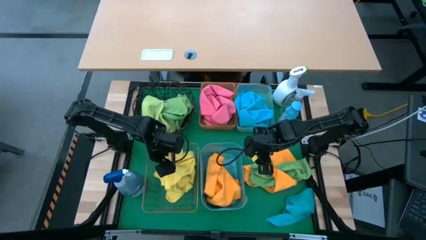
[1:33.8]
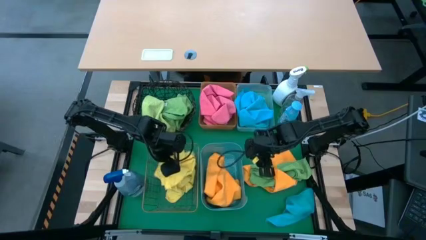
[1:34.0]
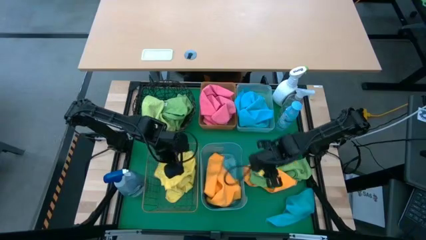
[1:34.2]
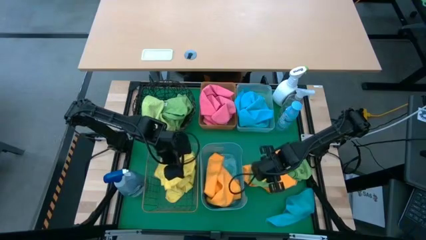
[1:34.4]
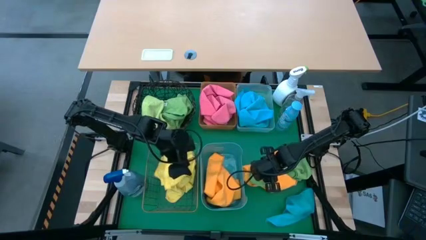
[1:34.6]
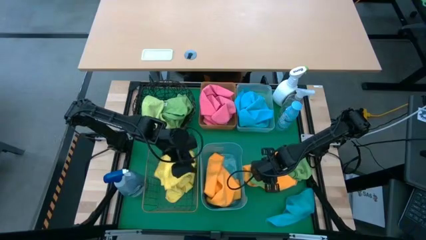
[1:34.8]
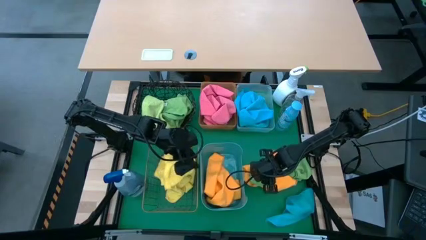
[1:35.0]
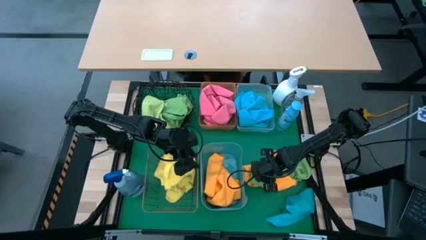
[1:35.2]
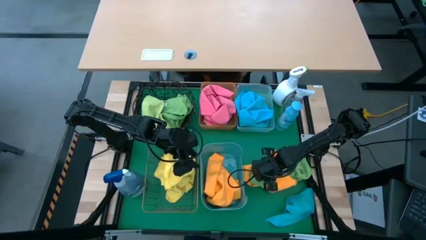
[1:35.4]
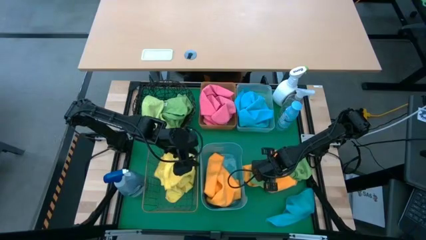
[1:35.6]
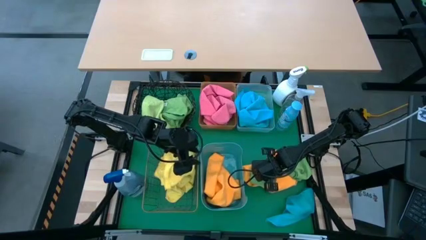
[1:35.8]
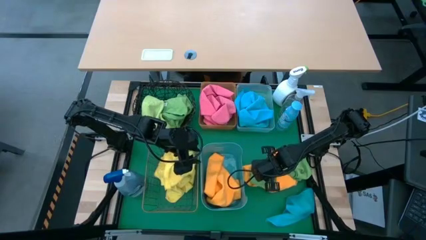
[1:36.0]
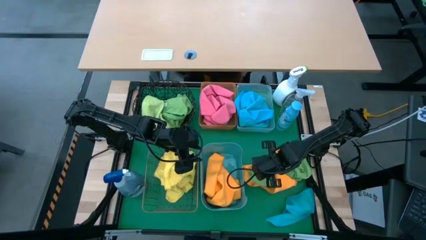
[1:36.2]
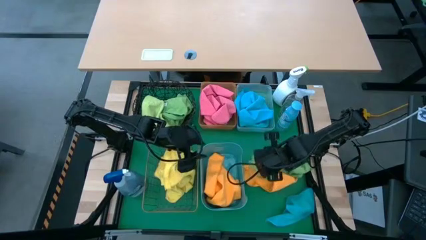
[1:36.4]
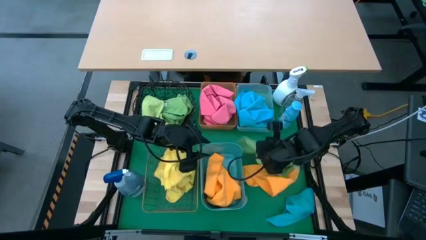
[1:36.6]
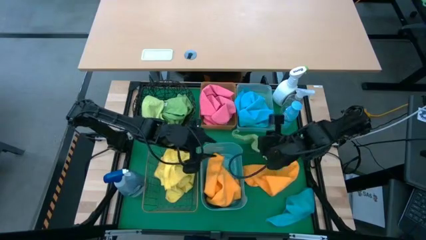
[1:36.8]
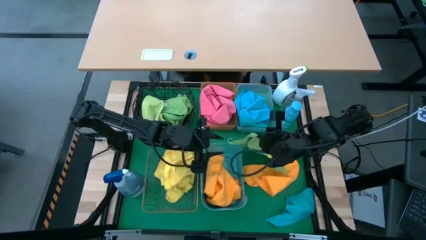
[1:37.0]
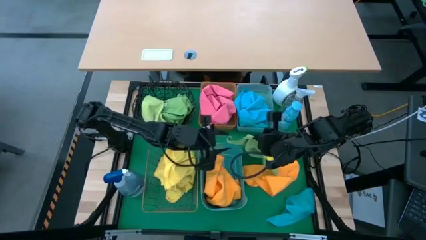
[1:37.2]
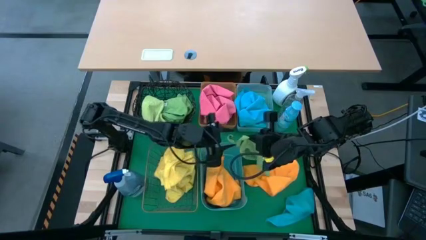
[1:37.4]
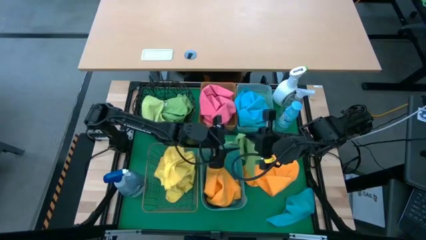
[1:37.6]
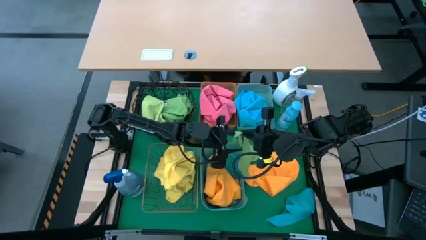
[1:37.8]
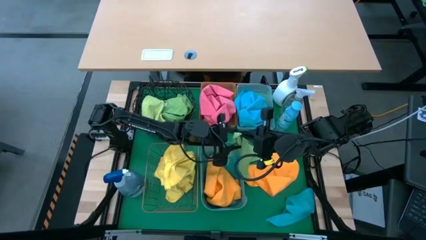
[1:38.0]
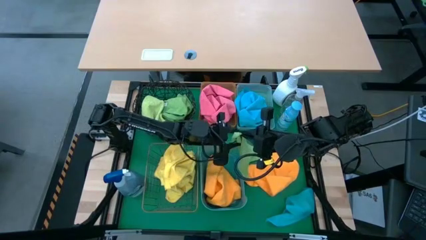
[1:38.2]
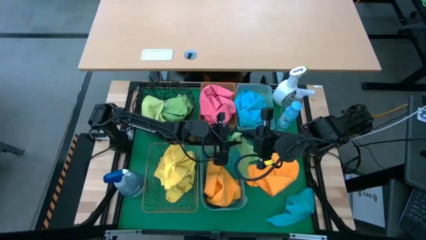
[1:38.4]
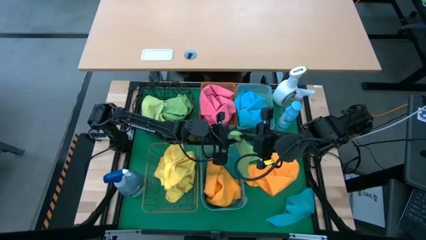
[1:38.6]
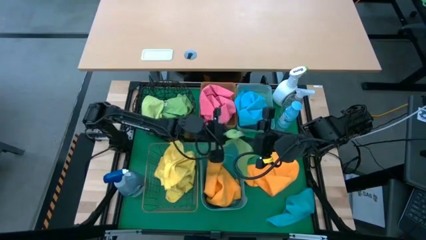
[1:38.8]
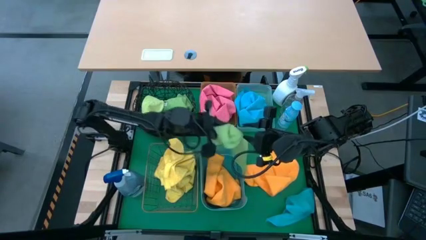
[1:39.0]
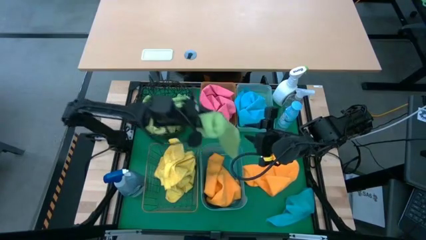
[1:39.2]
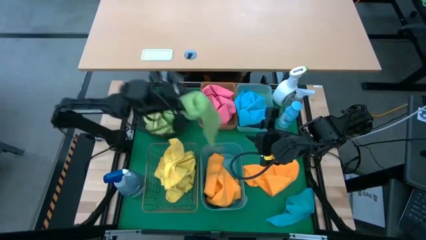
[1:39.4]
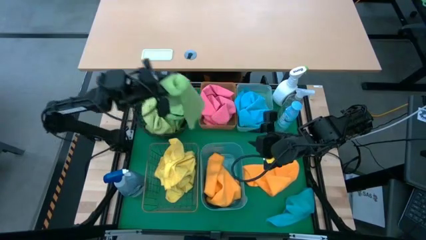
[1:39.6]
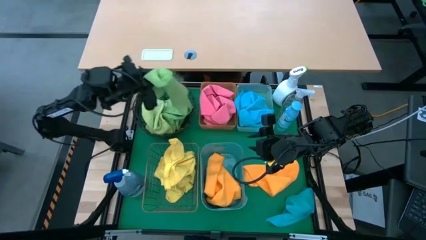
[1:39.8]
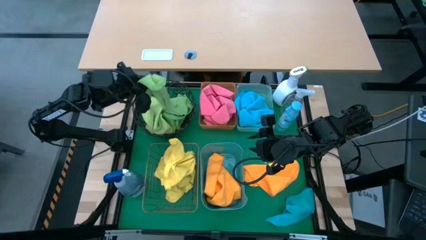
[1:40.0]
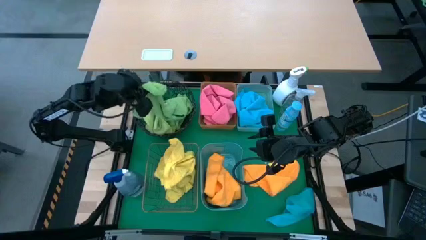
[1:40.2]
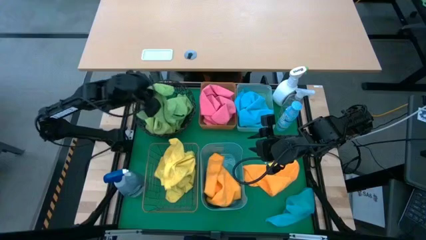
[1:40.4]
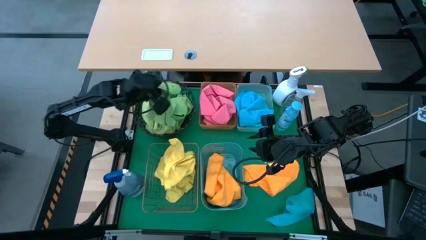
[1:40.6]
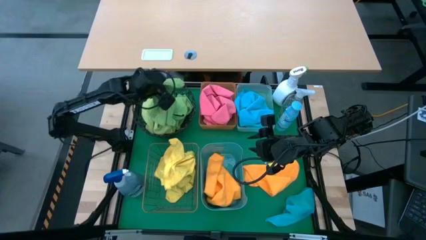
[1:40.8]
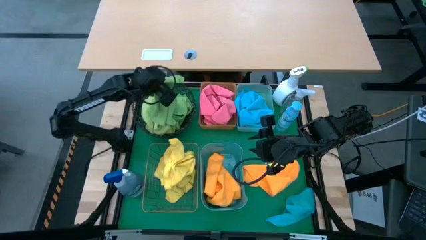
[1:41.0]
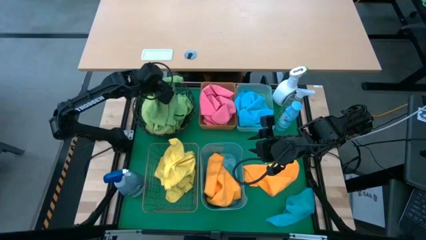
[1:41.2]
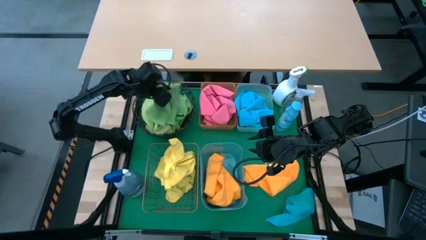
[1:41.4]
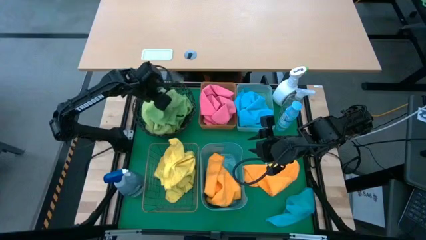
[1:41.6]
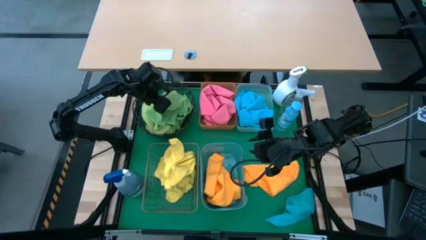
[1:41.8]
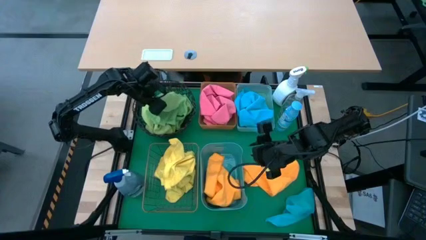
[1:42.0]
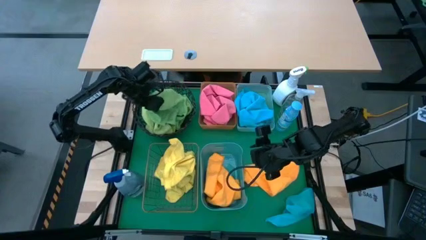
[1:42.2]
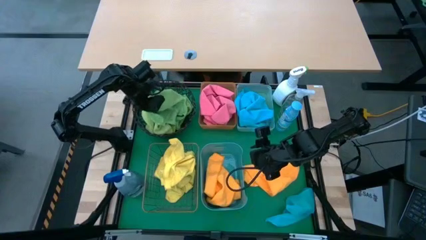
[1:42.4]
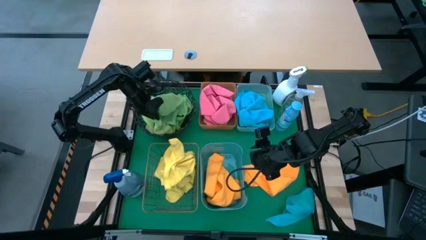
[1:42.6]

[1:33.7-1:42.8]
Task: Sort microfiber towel by color & place in baskets
Put the green towel into the black basket

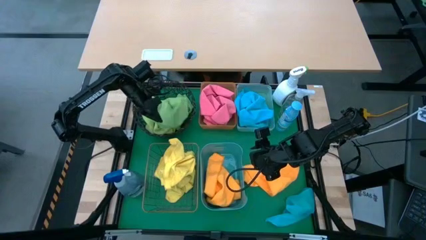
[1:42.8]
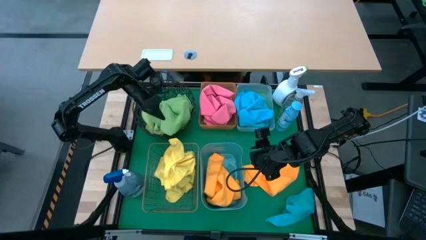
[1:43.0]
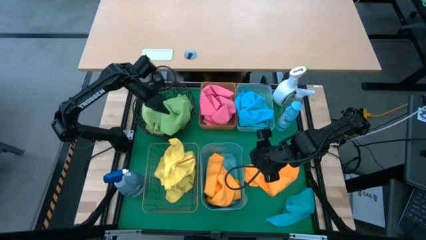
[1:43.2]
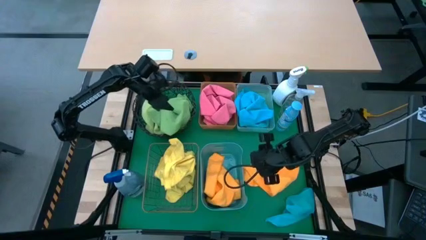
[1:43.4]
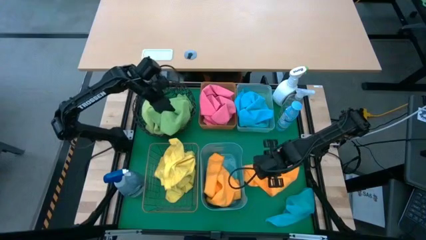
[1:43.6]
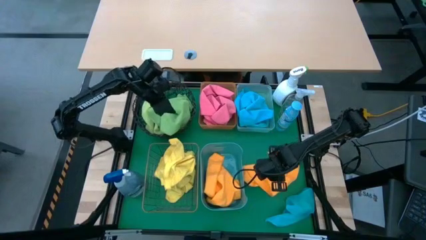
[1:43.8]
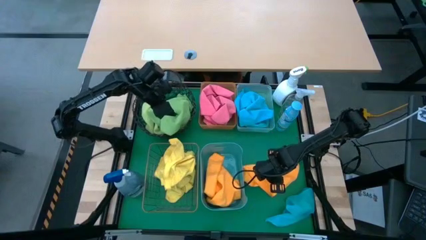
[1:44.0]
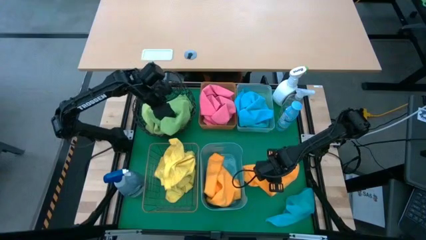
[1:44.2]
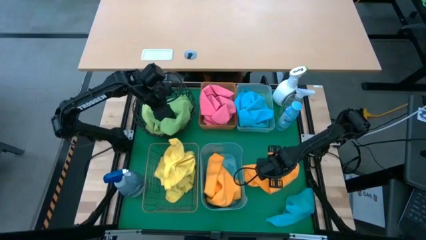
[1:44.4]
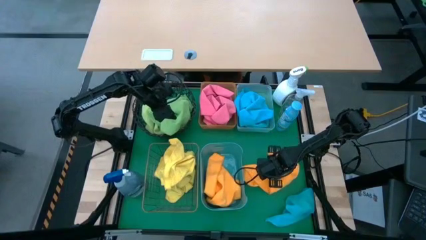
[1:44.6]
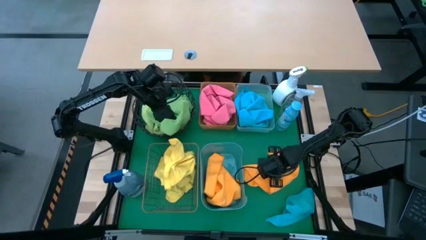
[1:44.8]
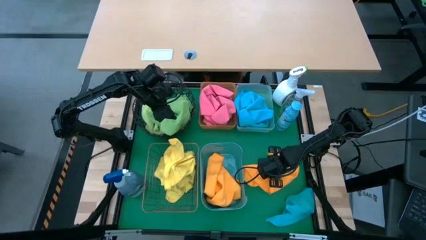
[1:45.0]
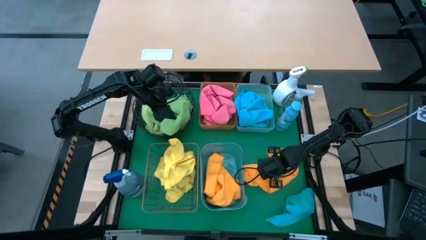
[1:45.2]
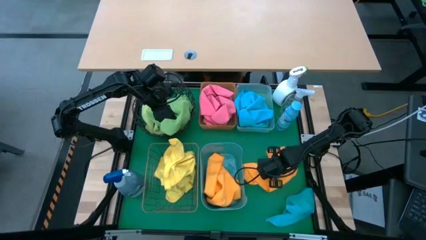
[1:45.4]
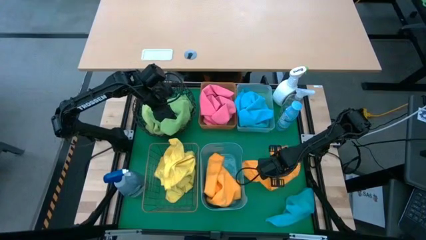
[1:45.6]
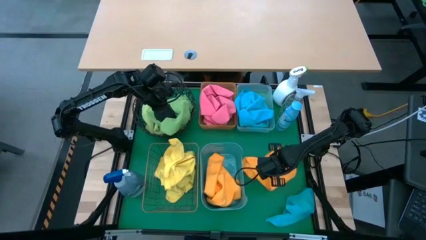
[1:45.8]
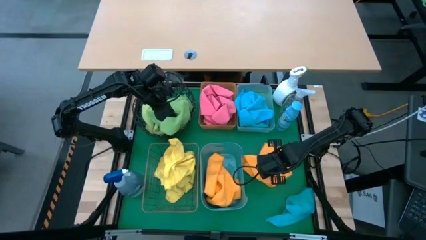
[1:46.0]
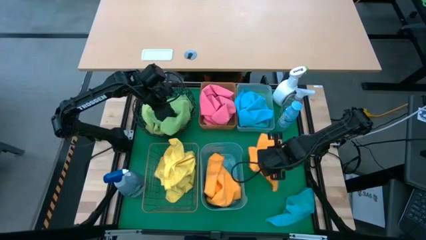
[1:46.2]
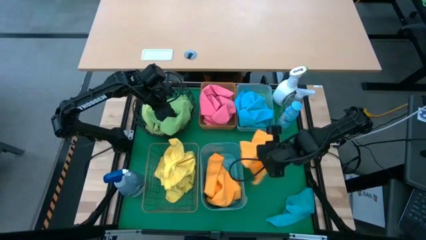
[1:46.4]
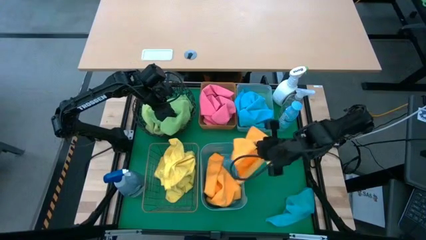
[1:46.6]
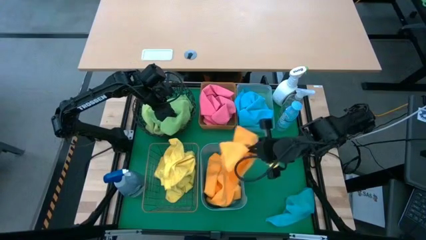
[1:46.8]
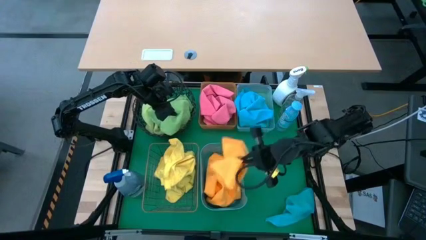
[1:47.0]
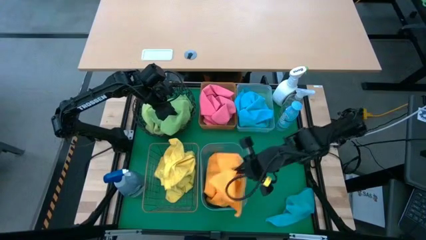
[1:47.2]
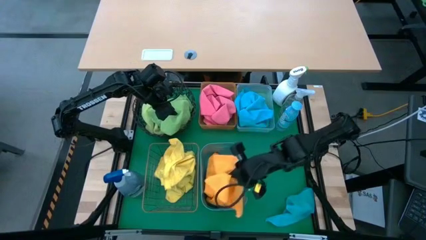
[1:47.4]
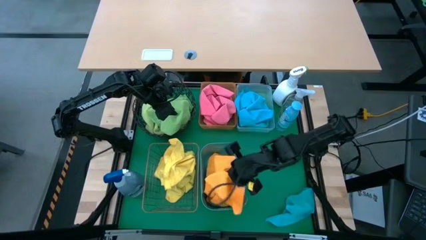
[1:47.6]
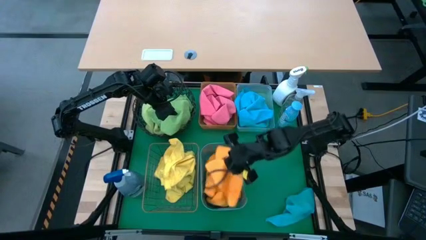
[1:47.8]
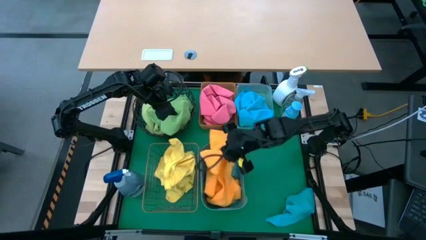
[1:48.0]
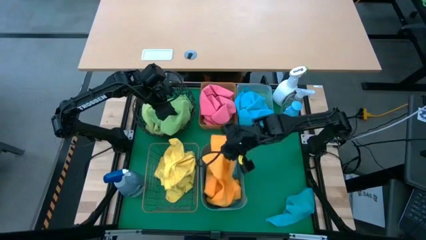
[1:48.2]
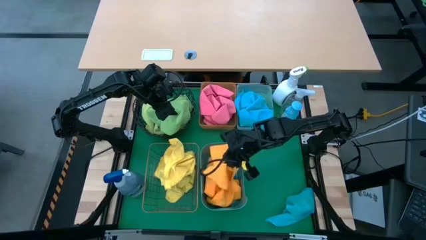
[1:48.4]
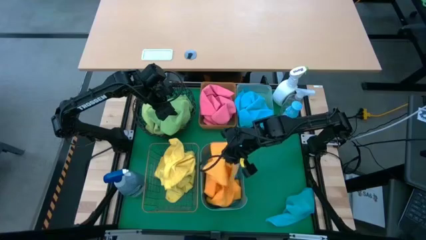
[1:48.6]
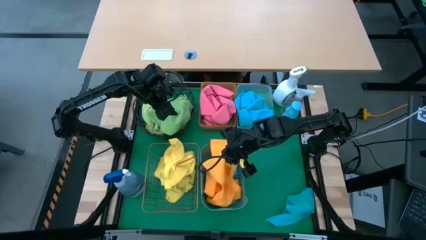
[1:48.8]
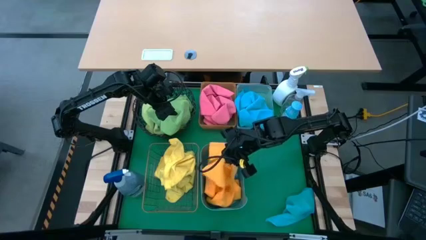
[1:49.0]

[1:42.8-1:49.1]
Put the orange towel into the blue bin

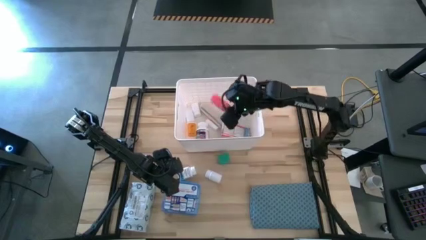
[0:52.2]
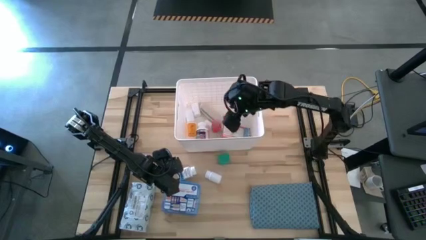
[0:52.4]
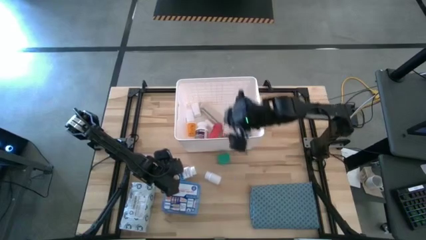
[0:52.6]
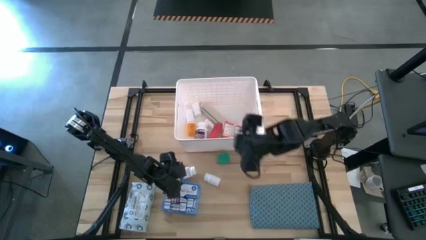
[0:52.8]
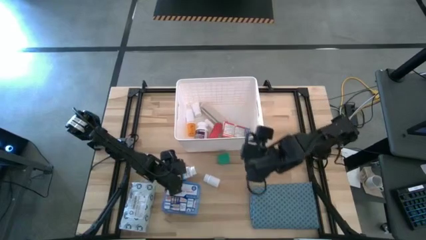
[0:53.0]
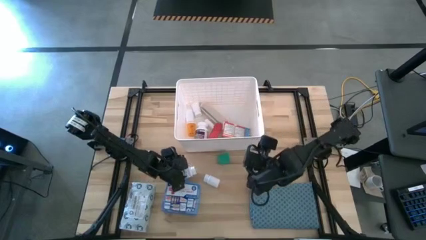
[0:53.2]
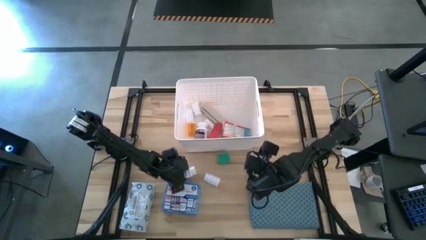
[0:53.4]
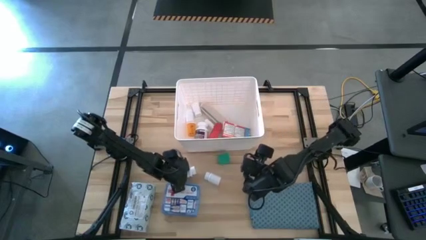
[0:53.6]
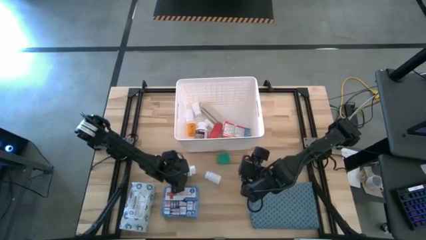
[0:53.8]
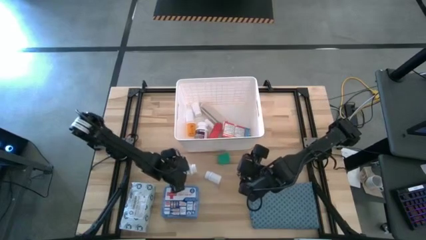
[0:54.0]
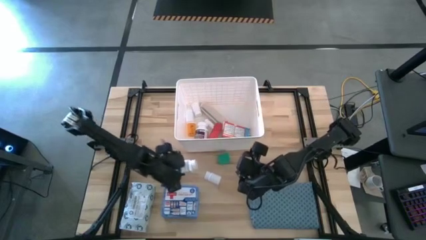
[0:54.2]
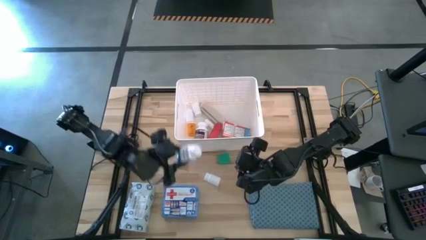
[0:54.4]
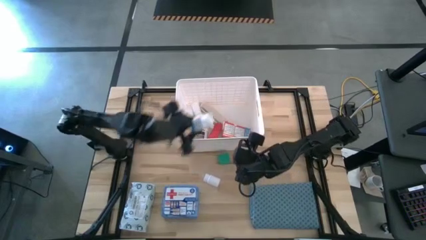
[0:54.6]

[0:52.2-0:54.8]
Task: Pick & place medical supplies in basket/bin
Put the blue medicine bottle into the white bin
